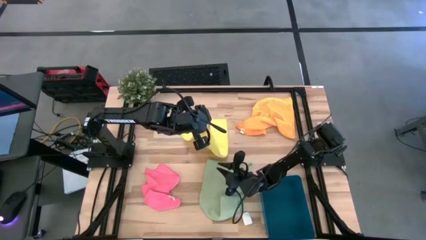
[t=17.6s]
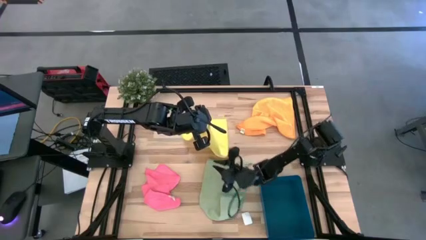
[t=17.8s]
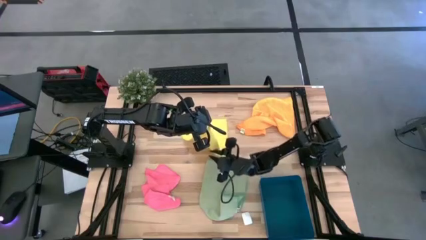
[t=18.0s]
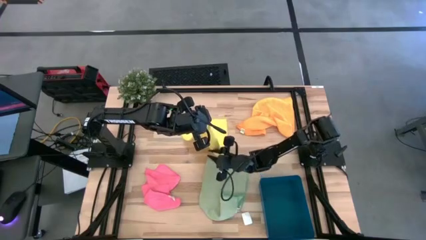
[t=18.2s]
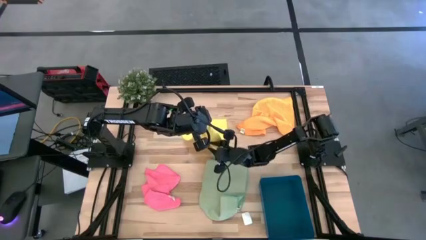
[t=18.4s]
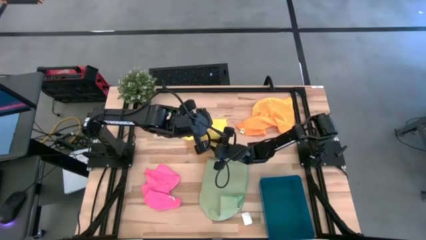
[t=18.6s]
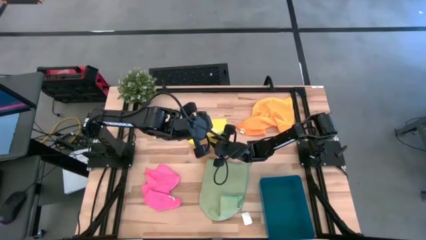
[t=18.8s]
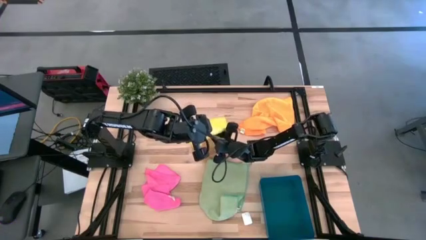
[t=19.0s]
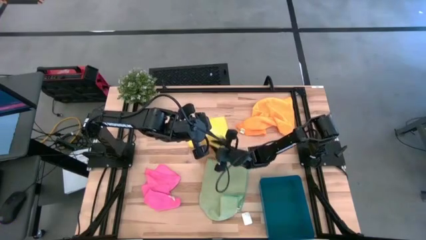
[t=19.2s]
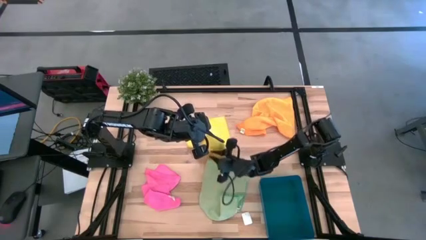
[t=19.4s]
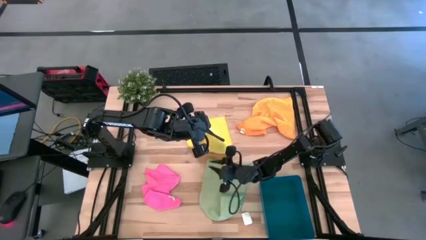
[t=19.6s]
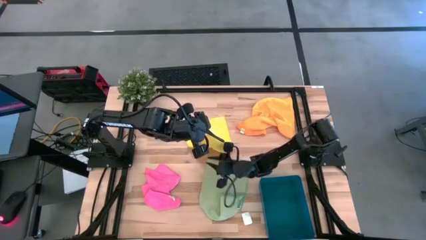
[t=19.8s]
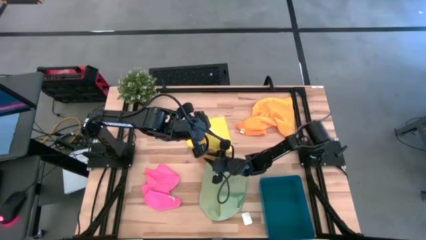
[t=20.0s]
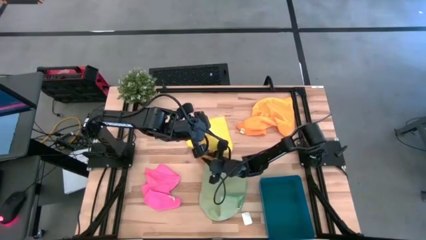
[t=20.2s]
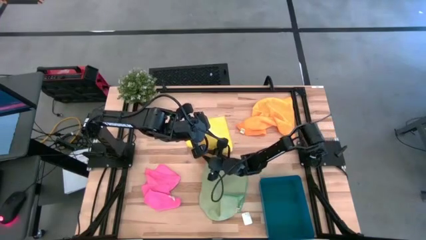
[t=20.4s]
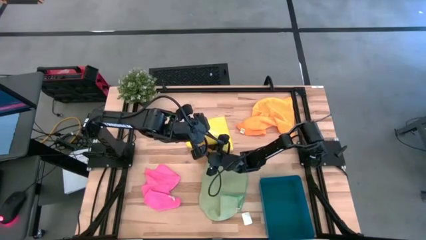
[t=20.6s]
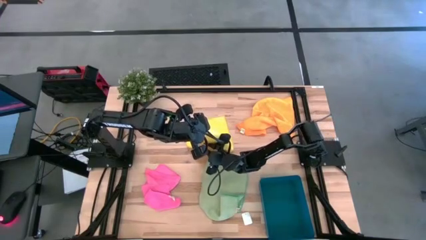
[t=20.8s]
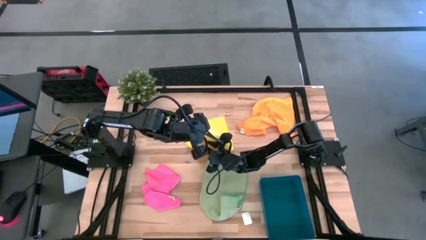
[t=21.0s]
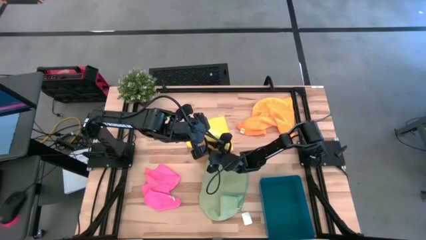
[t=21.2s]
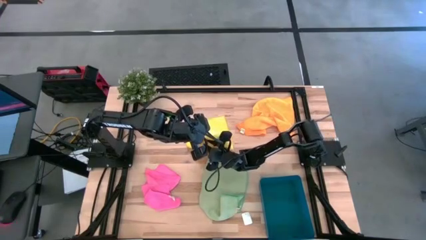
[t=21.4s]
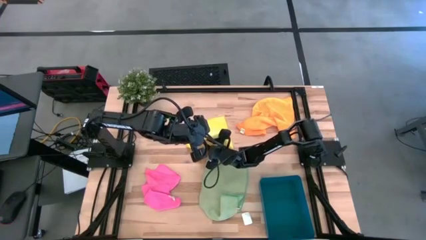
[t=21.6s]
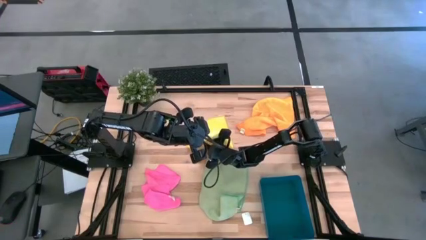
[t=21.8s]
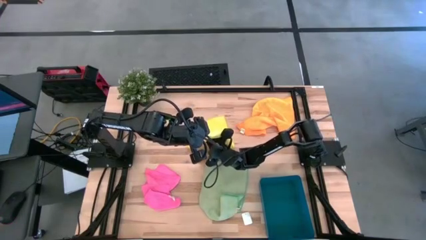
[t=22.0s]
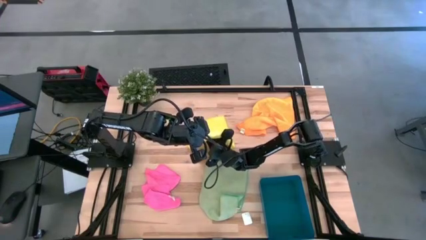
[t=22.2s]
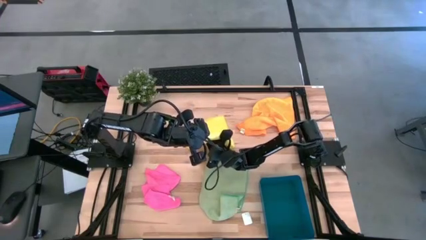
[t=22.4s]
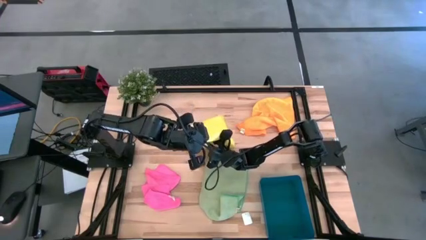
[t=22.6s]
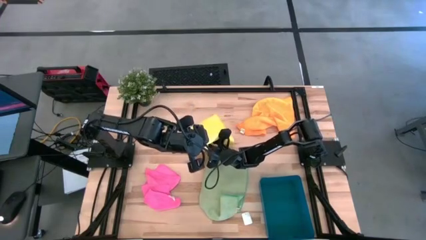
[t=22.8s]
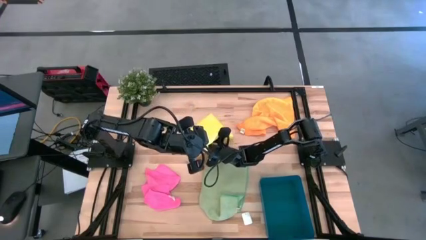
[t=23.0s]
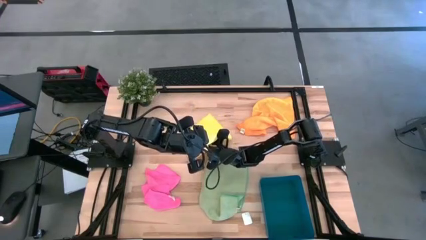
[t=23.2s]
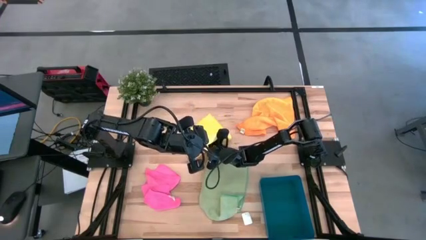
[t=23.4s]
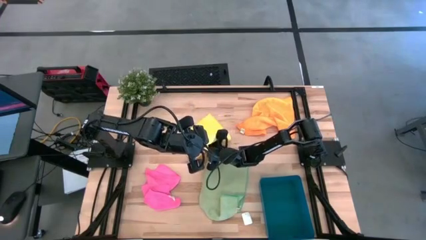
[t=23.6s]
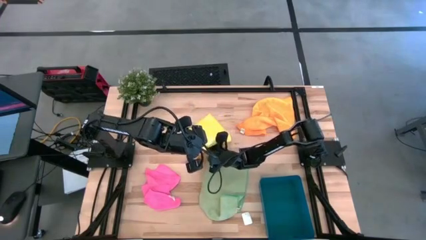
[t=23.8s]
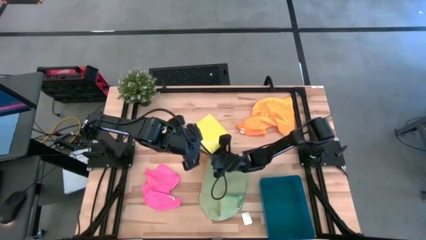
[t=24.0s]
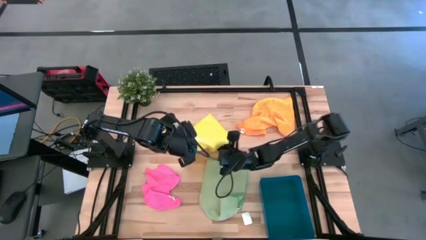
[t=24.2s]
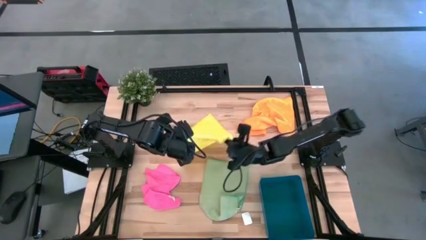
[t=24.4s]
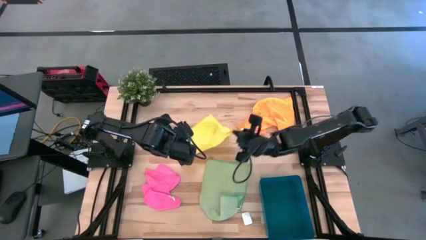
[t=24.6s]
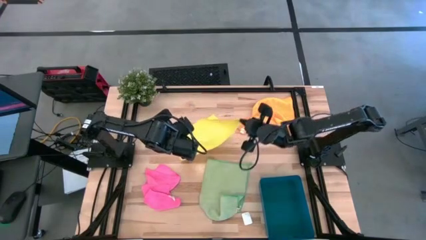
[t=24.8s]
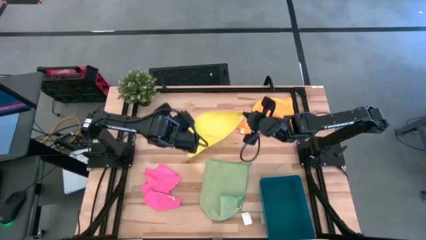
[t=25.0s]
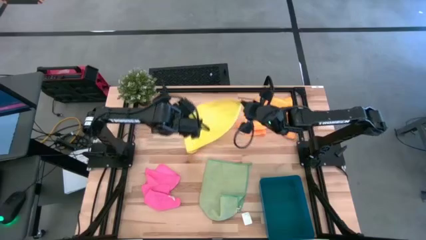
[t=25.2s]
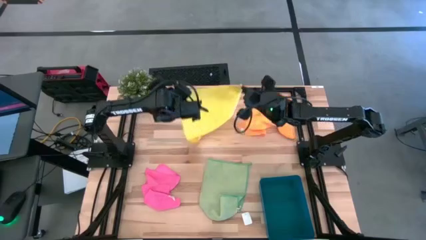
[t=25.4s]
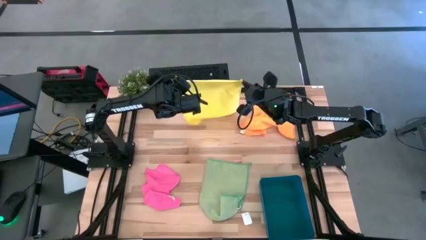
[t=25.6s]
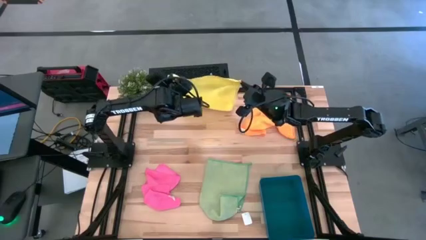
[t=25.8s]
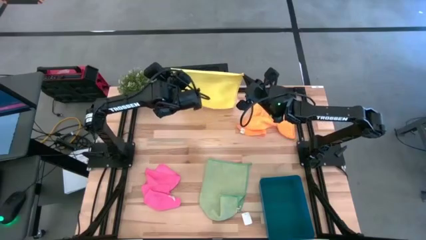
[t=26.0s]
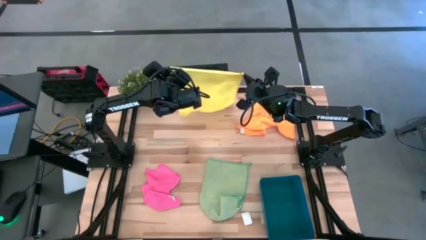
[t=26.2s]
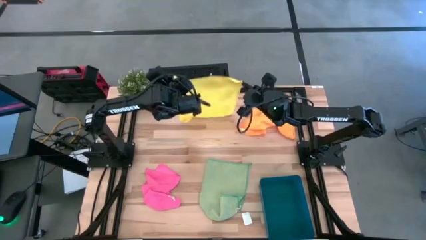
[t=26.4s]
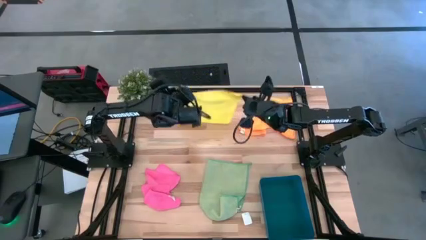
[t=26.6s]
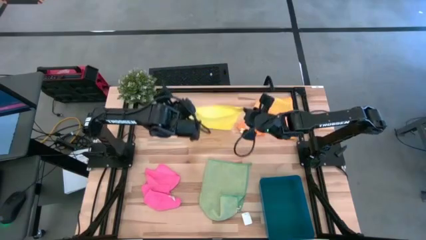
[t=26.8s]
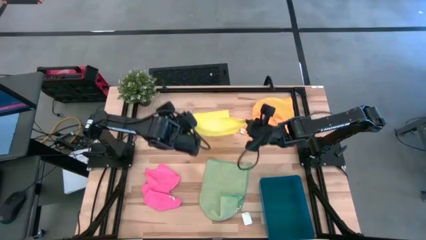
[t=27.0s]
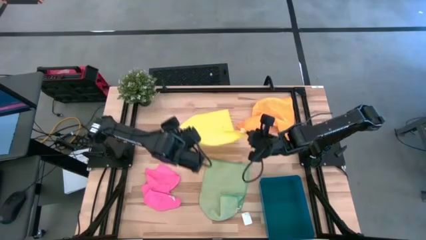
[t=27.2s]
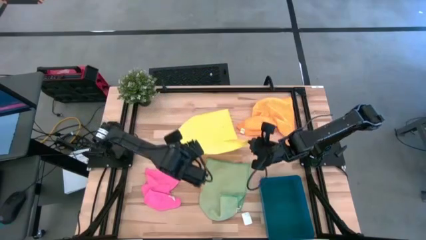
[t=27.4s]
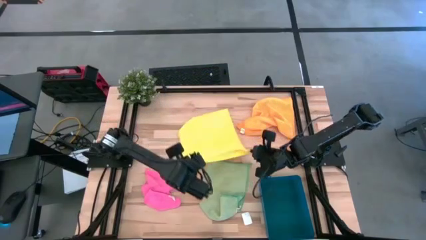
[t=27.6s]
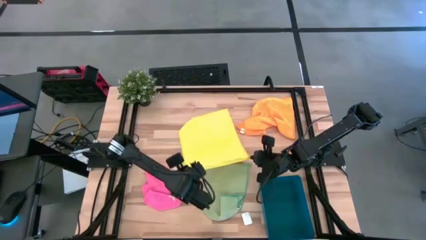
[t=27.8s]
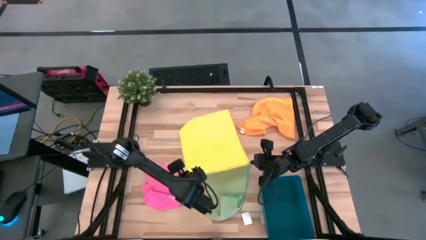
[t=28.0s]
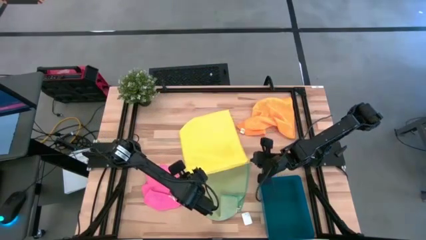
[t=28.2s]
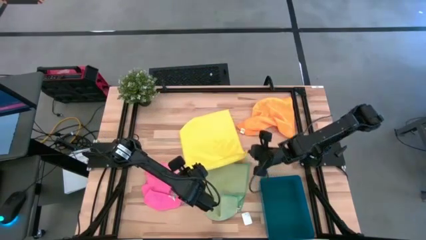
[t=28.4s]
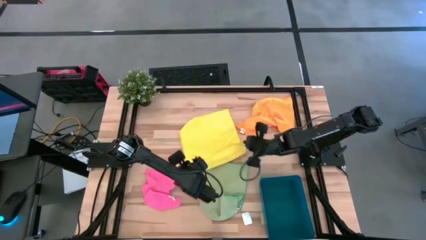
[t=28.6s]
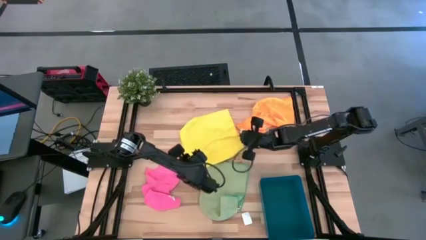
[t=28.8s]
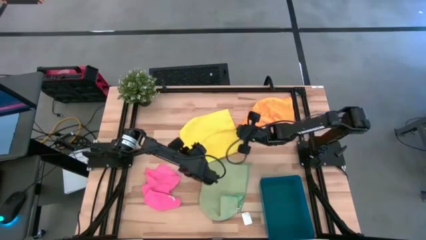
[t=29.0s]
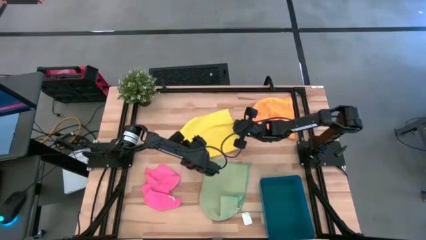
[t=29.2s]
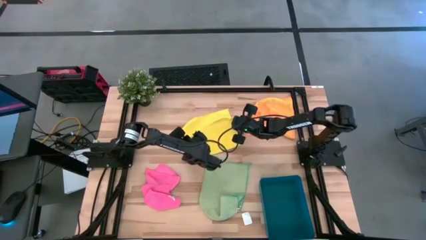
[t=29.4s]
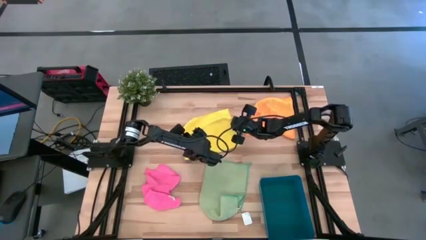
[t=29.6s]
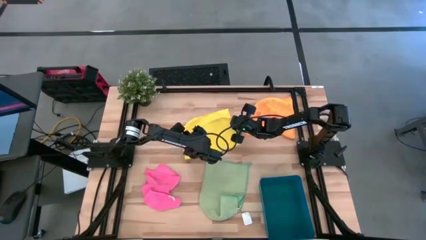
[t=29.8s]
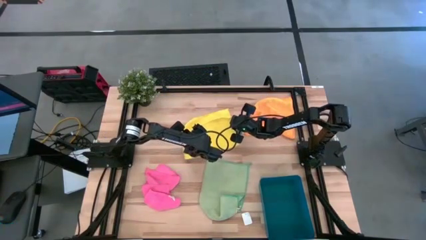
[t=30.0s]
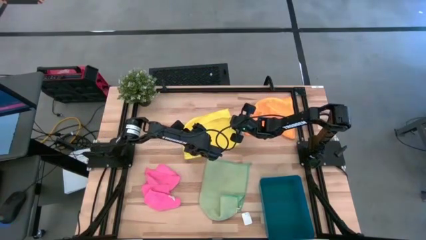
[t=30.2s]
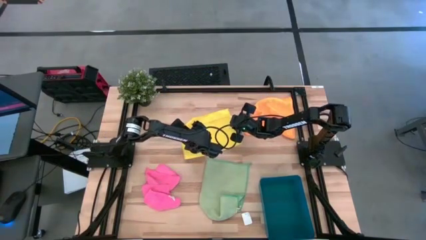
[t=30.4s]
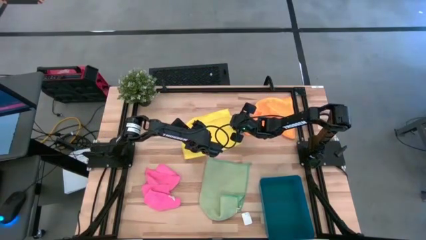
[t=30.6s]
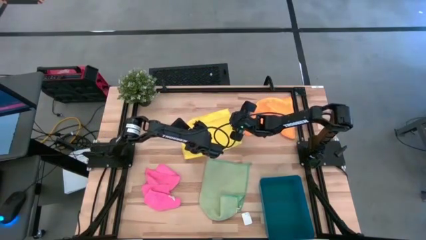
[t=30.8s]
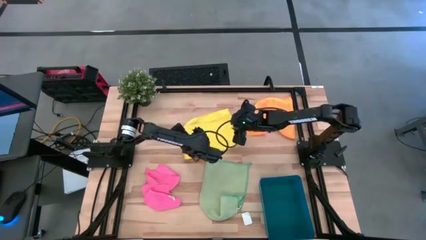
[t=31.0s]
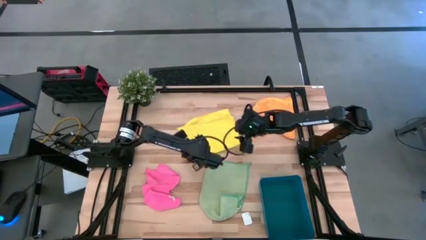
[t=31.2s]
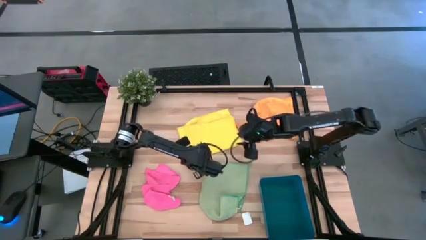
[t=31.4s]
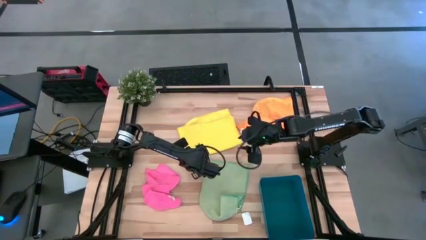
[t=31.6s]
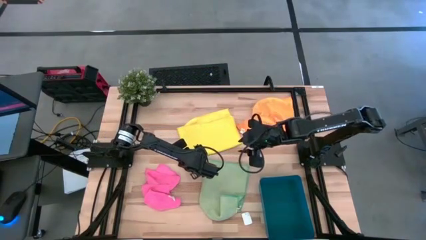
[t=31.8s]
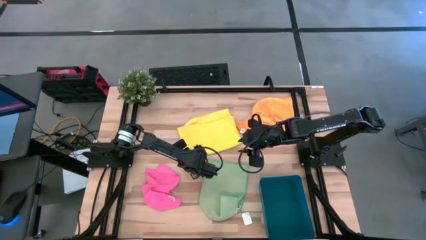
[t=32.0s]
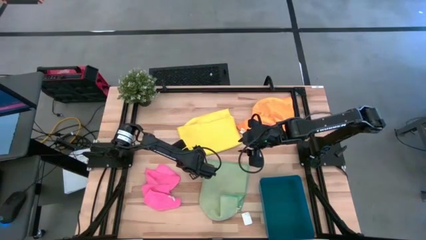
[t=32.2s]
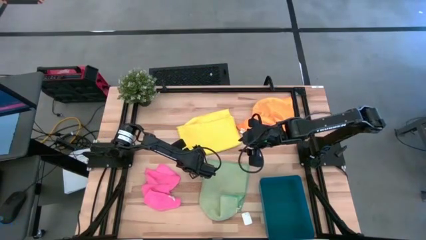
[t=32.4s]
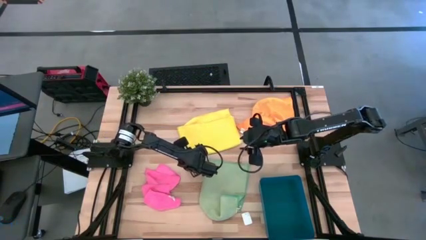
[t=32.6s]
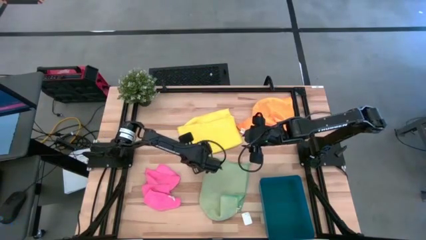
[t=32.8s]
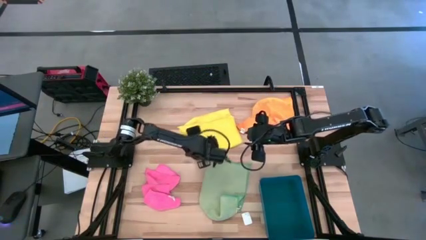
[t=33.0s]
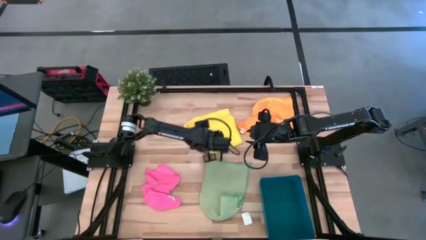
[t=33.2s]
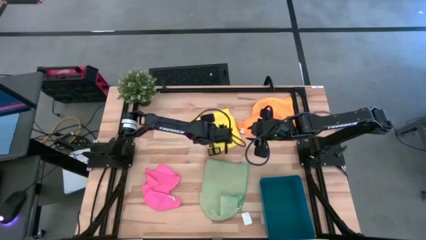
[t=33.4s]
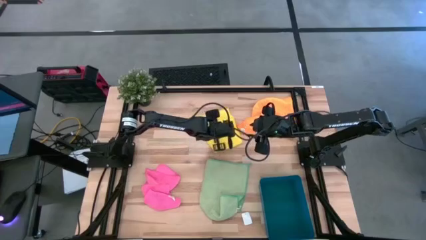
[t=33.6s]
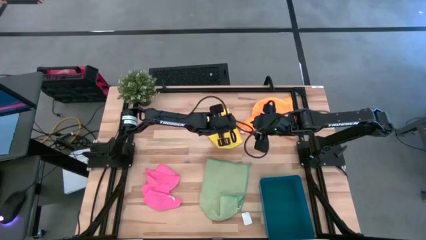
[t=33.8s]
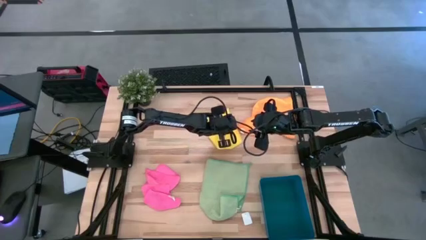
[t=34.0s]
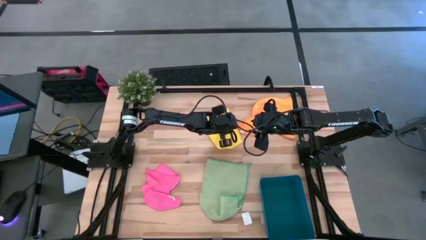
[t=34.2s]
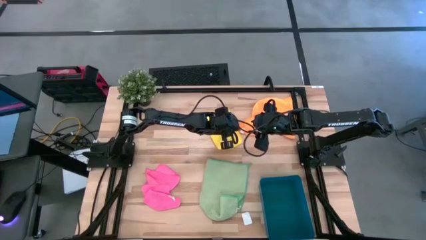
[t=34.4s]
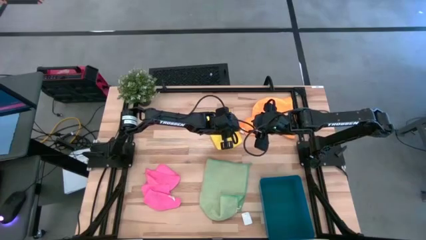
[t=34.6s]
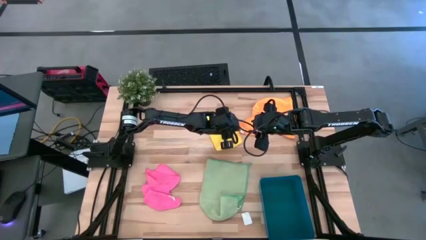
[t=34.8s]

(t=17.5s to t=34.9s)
Task: Fold microfiber towels
Fold the yellow microfiber towel
